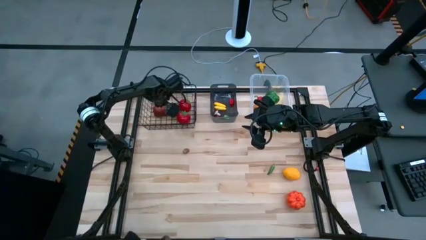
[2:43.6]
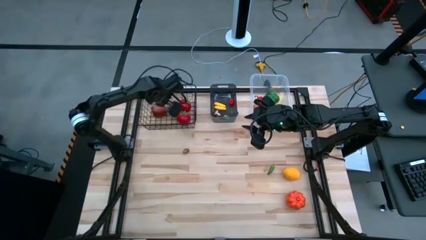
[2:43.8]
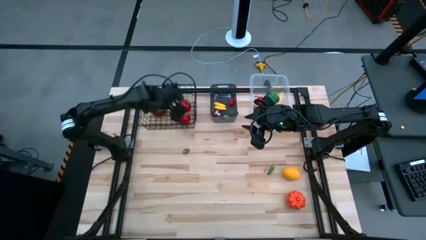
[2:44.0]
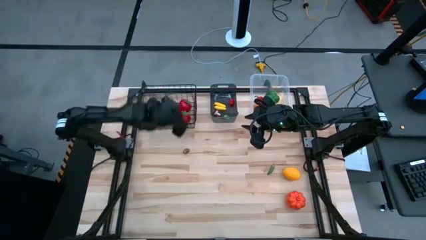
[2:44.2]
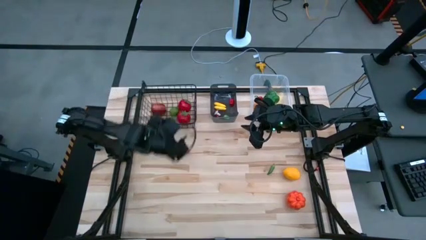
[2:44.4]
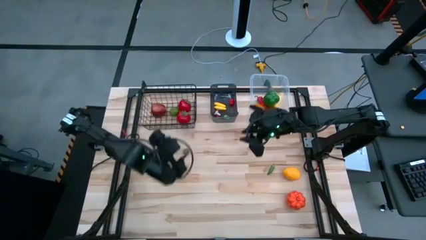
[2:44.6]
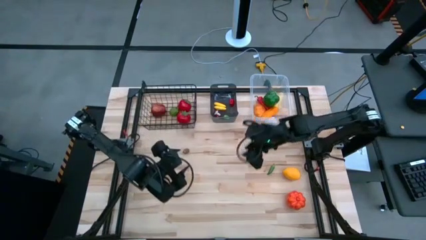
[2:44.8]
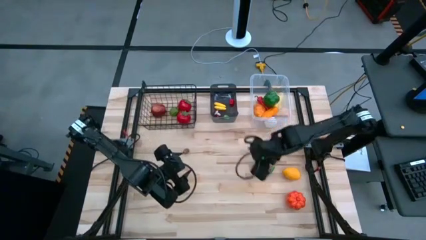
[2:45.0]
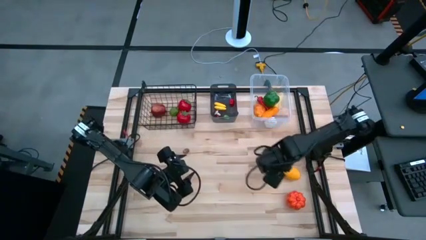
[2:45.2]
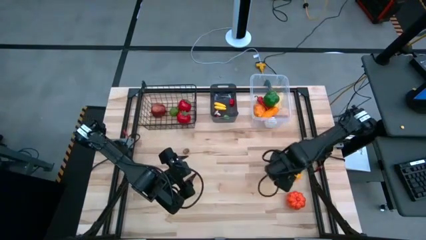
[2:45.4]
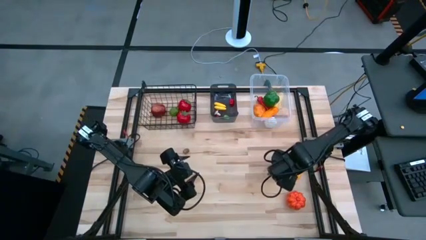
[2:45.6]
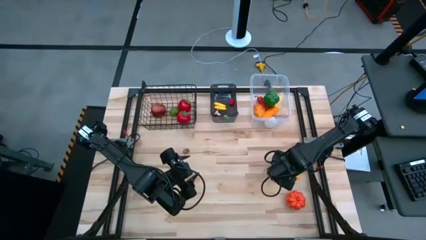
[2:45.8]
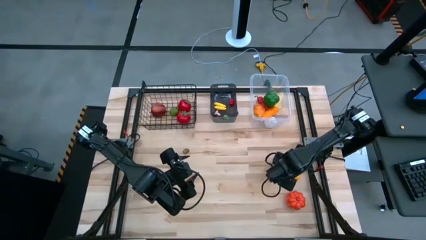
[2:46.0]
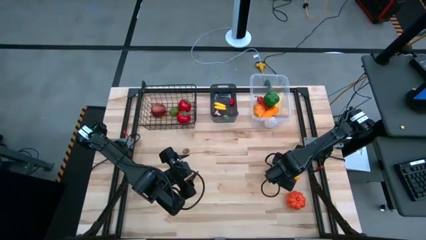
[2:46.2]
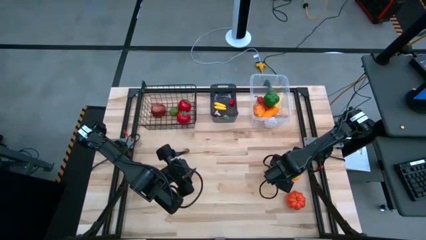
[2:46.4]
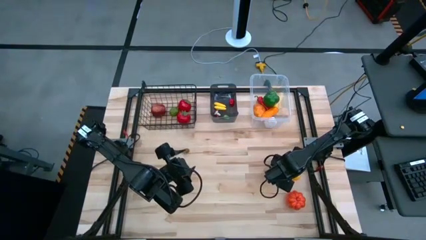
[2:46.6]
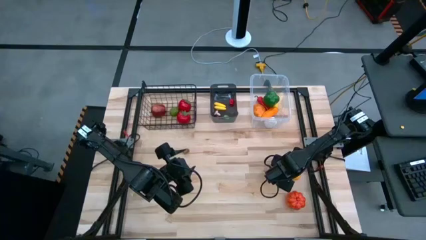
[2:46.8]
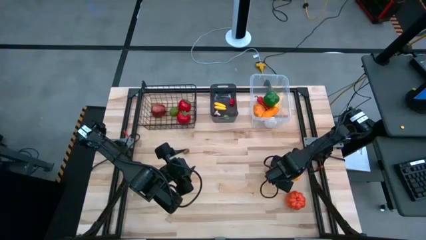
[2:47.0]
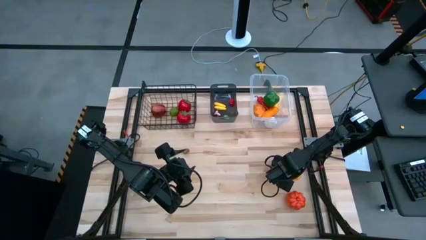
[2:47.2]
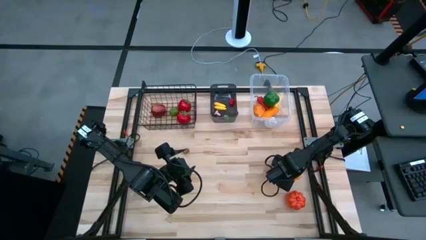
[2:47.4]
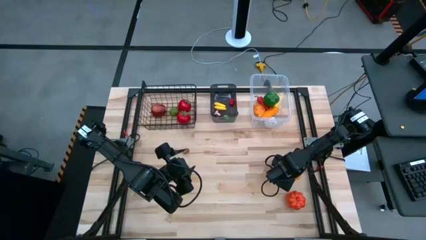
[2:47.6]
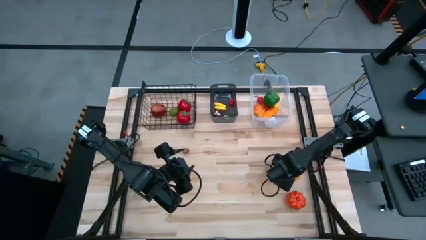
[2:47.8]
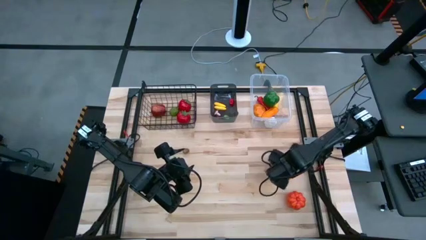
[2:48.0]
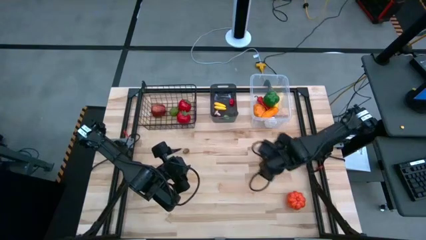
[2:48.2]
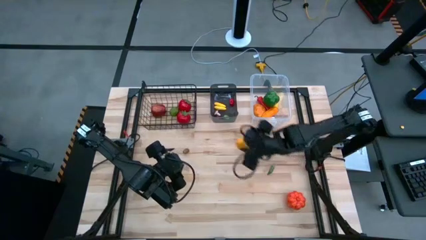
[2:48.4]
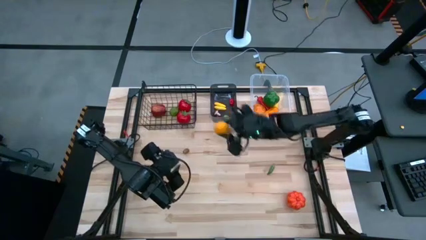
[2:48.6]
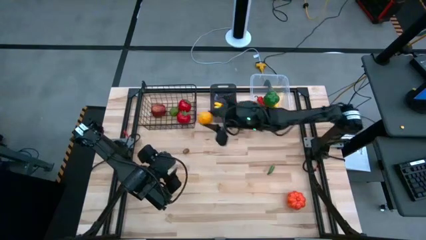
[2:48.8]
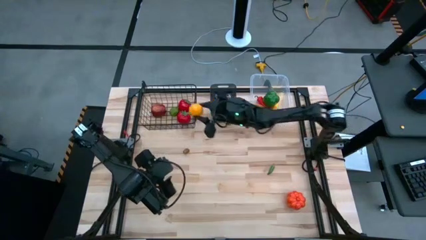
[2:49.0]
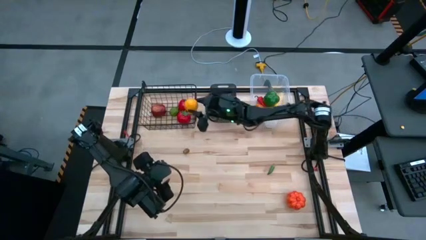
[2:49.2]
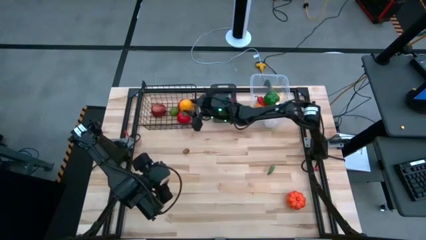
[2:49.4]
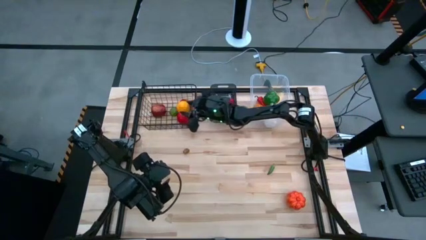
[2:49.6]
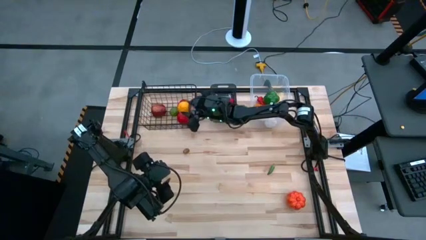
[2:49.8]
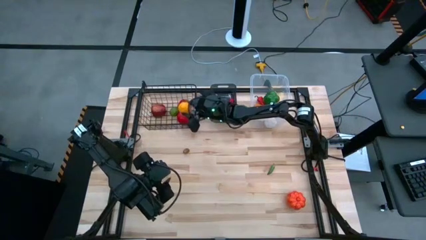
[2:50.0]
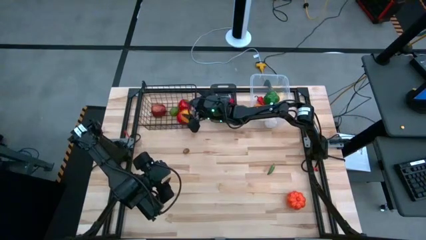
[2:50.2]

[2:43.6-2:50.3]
Task: Sort produce into baskets
Put the yellow lemon into the basket

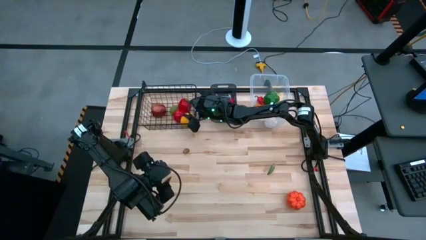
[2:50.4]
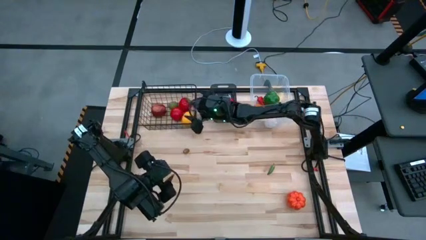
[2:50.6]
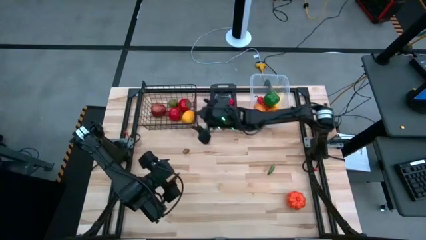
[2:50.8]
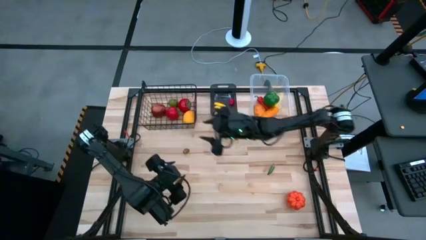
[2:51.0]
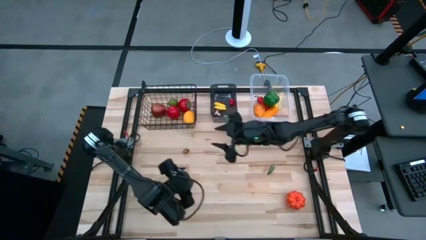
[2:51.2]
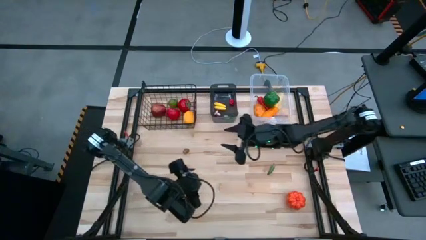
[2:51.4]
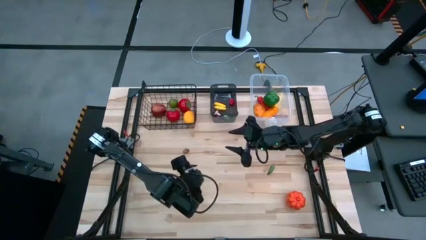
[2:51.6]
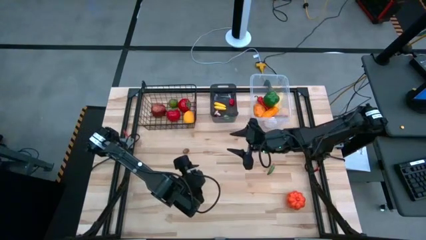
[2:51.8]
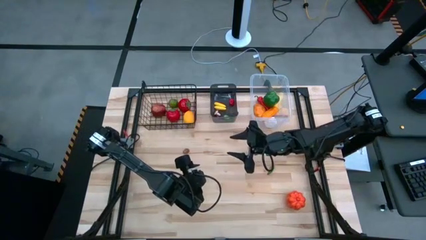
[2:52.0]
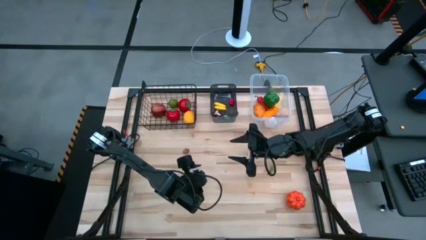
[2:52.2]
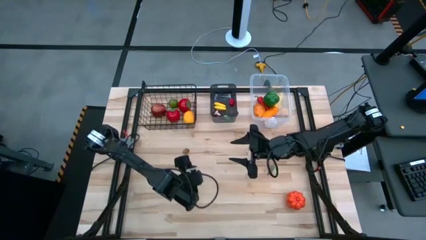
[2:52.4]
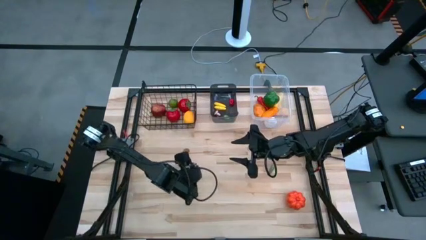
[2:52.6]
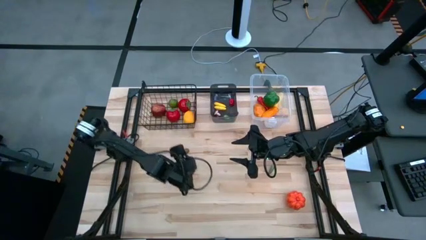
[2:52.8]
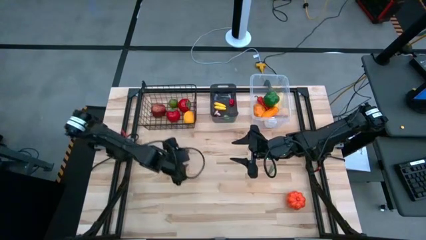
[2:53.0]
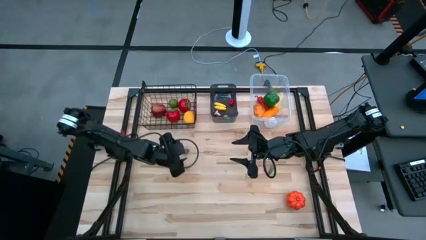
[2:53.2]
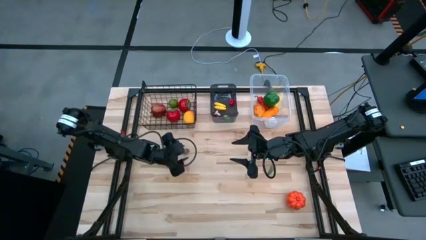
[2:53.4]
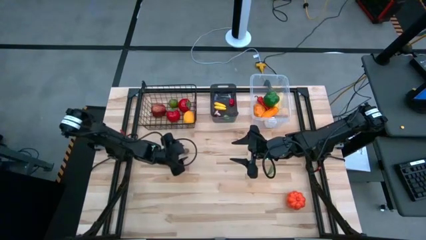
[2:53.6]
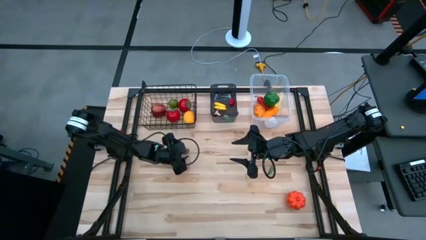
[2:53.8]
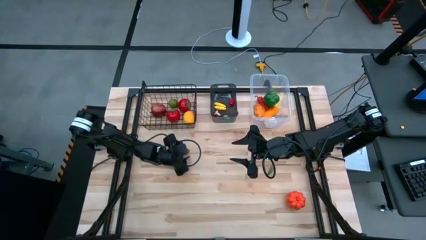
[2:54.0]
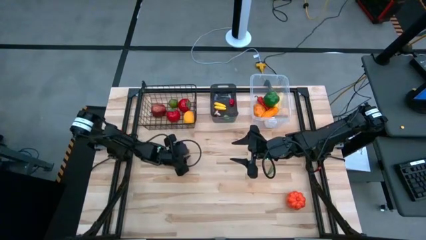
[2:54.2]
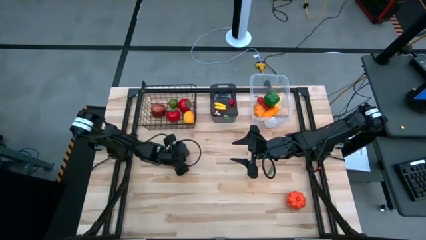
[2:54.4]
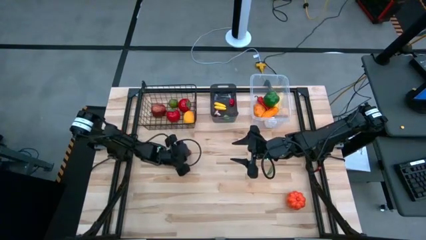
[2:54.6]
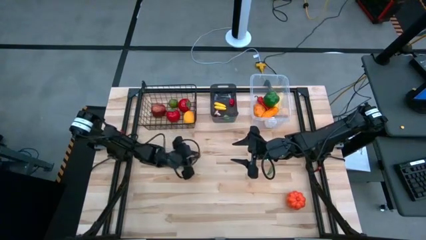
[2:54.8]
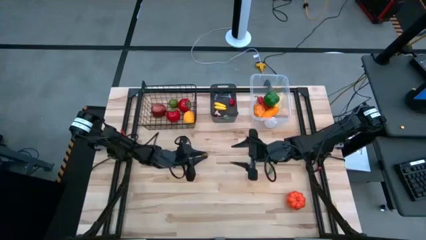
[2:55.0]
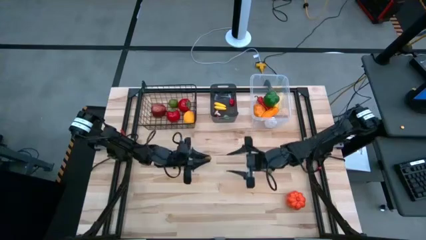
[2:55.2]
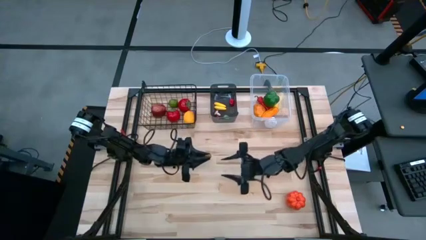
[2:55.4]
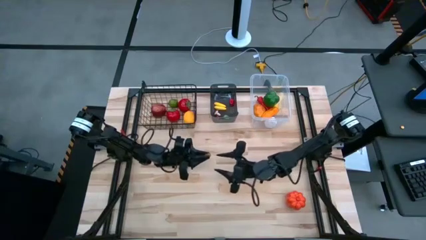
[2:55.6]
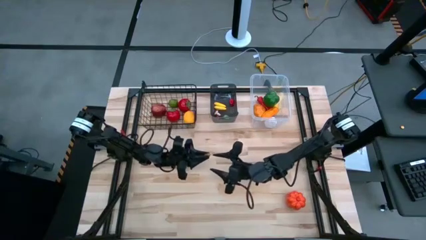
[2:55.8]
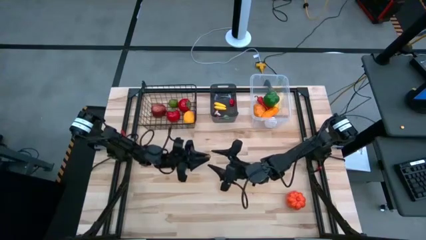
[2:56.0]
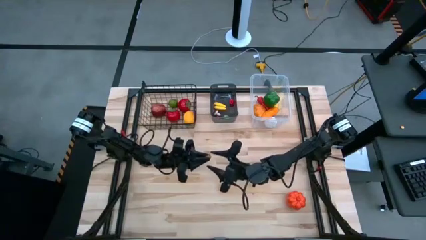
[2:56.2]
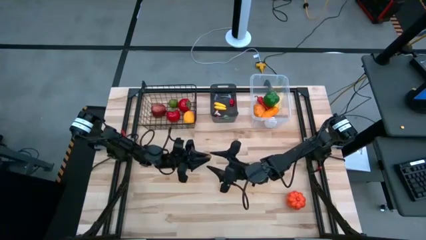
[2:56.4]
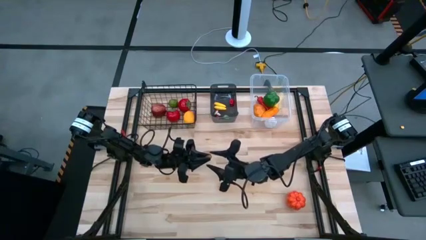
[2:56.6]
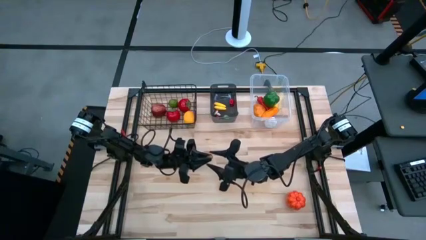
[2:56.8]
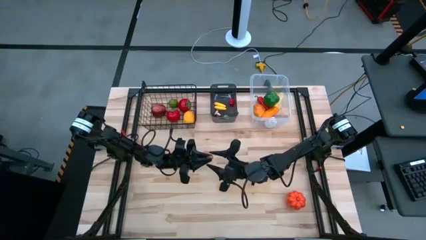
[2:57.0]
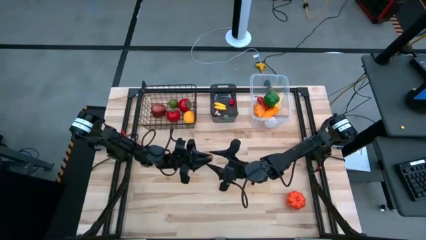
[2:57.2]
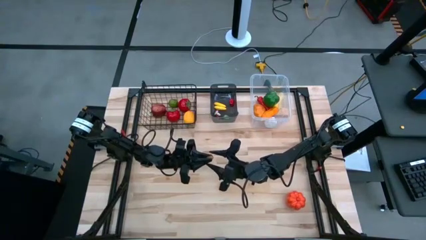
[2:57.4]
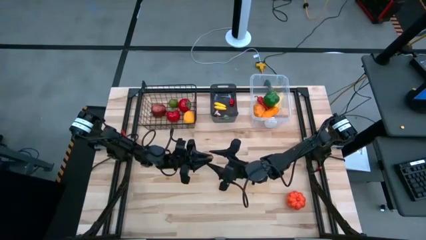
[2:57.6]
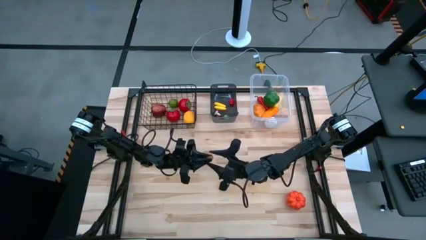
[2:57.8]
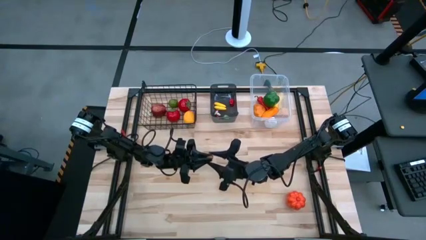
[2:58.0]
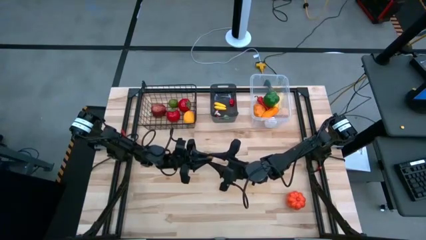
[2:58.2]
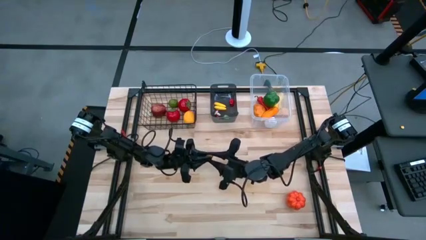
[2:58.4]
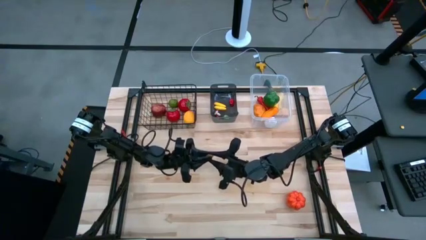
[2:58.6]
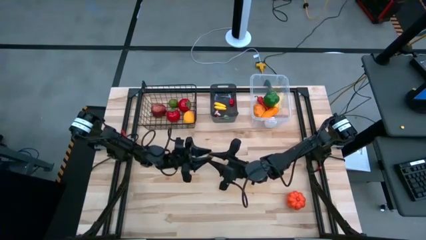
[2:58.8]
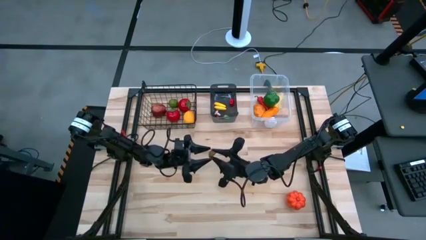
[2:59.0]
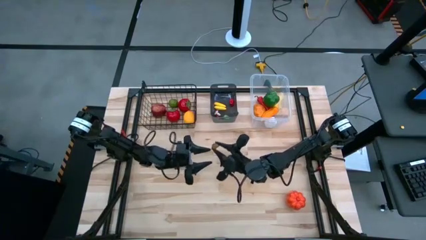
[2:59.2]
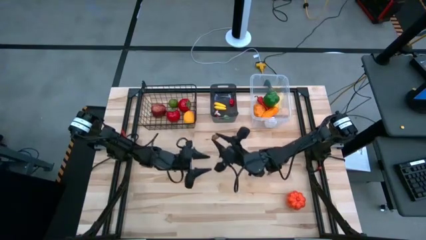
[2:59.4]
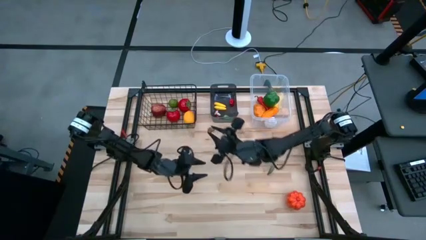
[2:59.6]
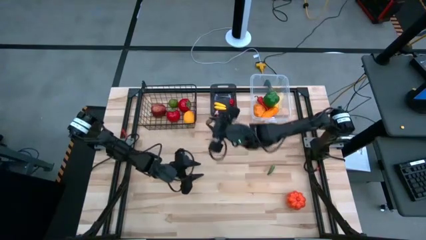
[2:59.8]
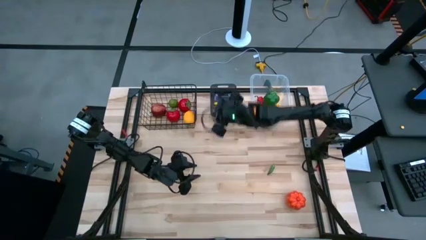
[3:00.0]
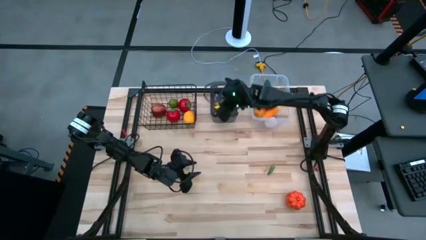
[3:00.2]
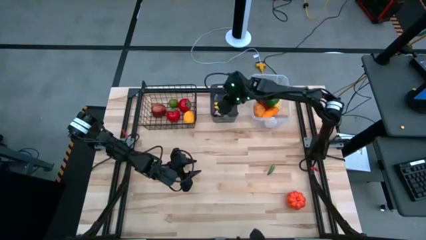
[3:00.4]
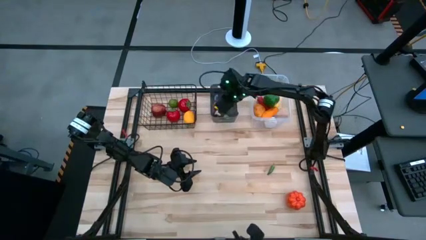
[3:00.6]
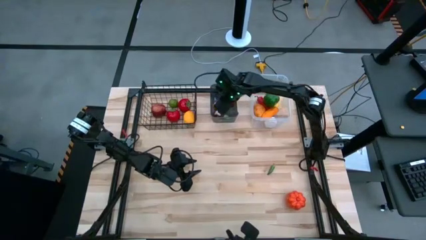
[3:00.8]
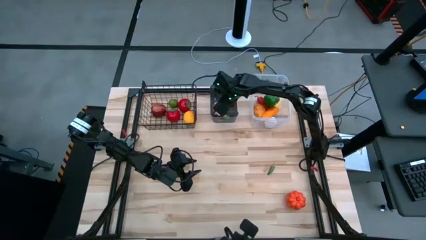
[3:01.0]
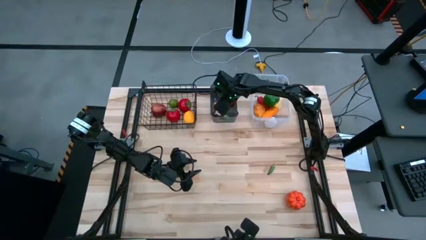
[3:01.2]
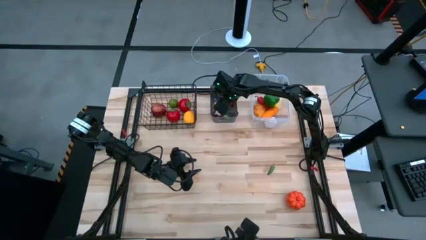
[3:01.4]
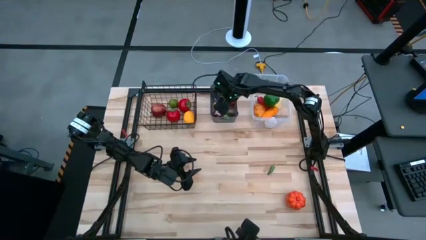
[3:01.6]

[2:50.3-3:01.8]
Put the kiwi into the black bin
